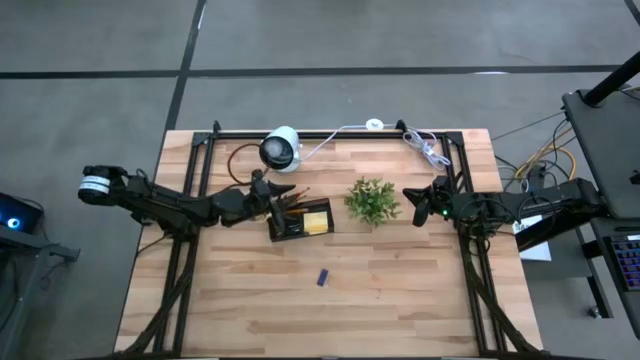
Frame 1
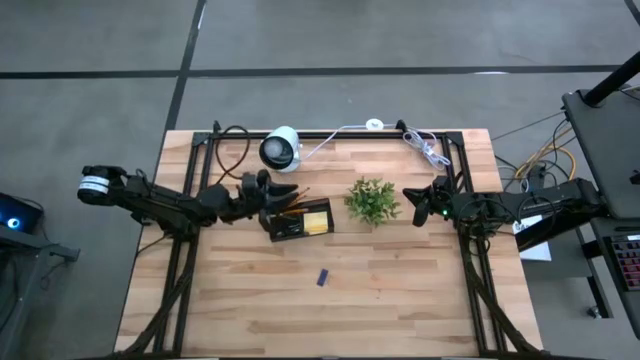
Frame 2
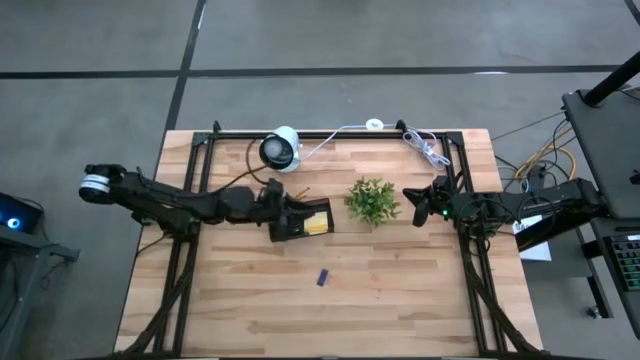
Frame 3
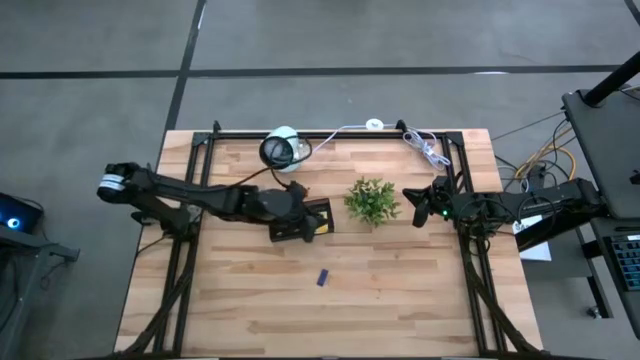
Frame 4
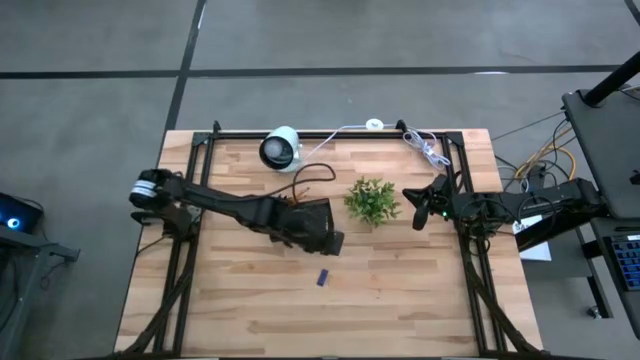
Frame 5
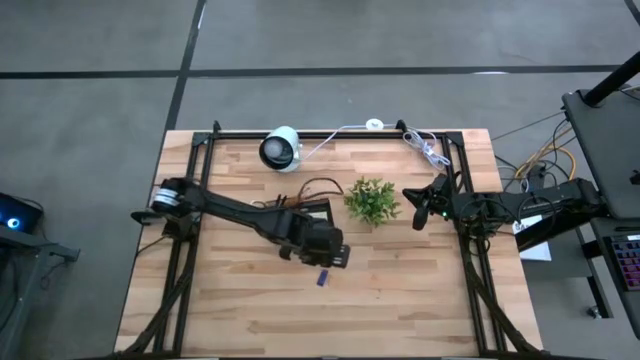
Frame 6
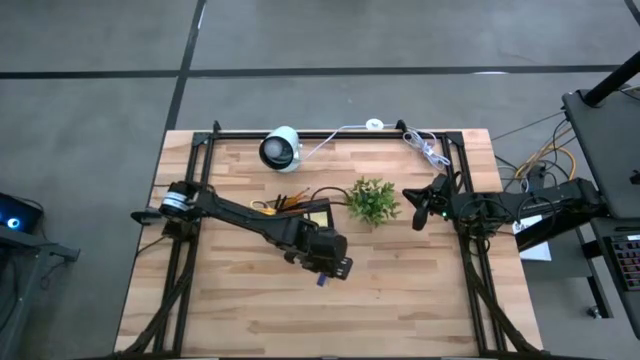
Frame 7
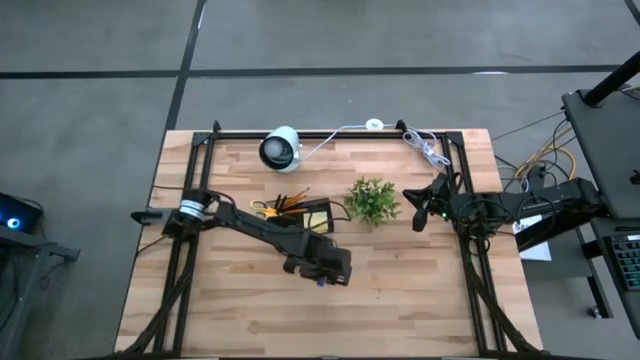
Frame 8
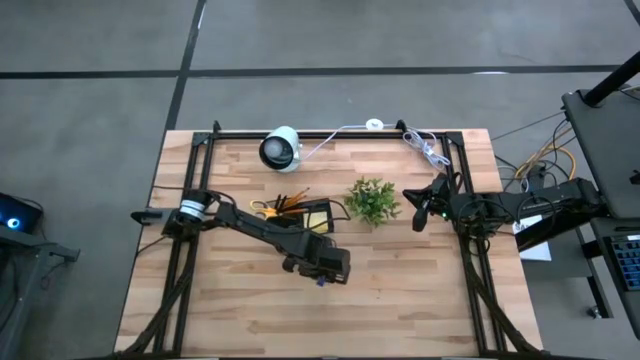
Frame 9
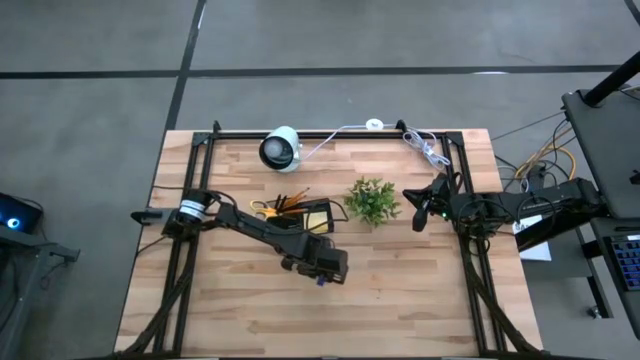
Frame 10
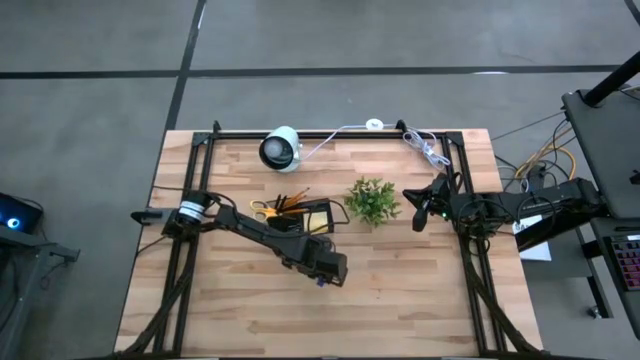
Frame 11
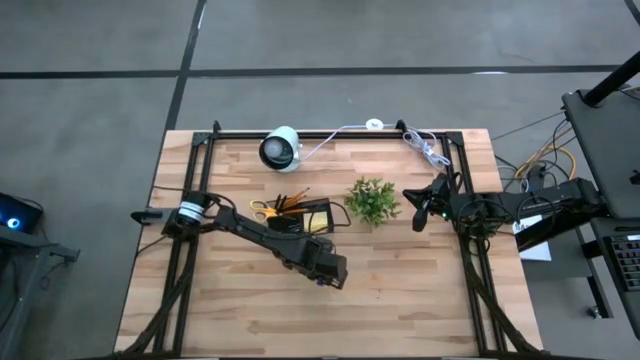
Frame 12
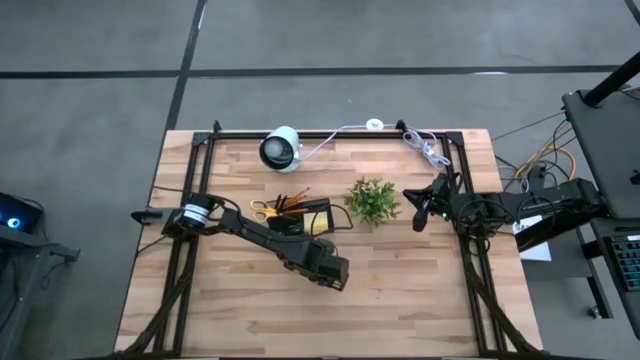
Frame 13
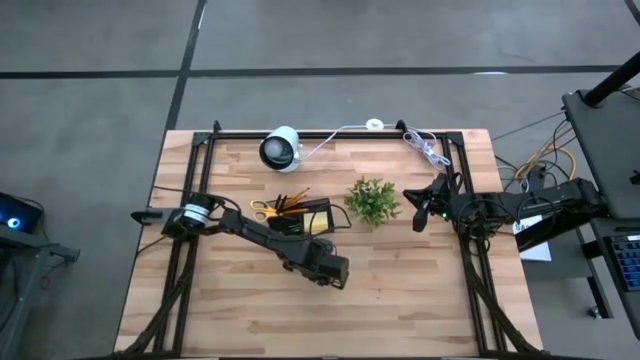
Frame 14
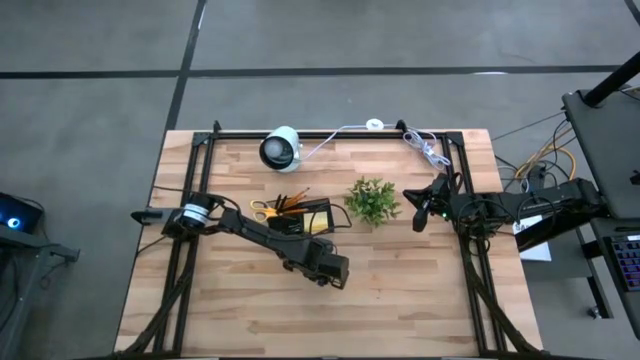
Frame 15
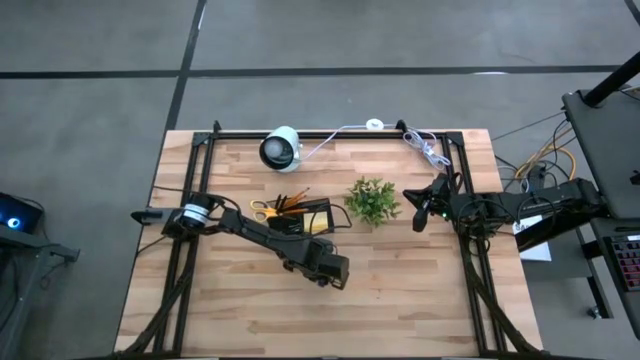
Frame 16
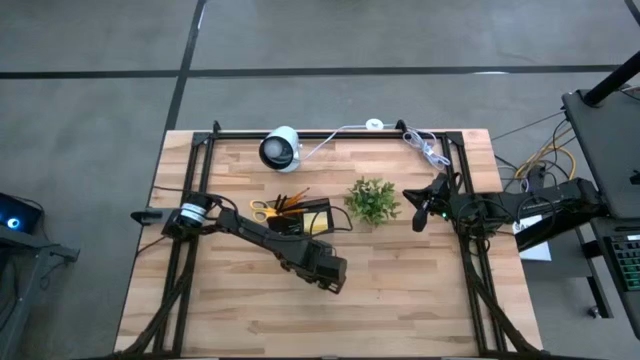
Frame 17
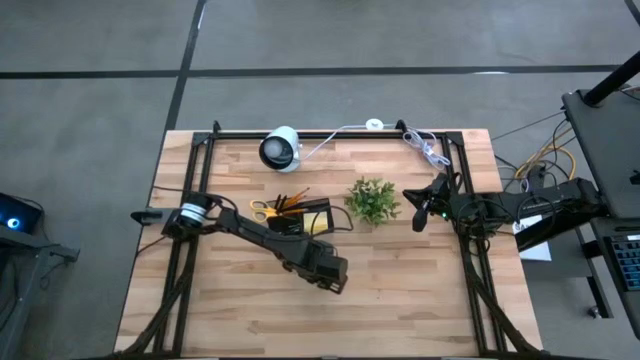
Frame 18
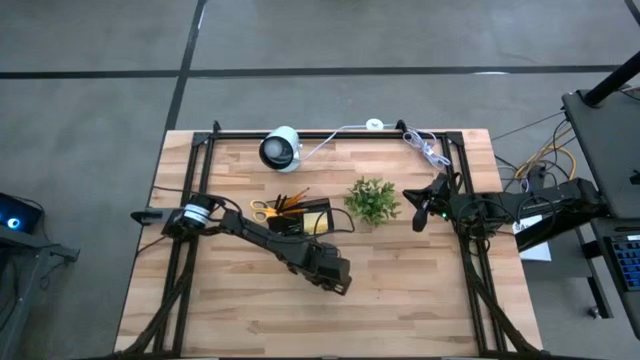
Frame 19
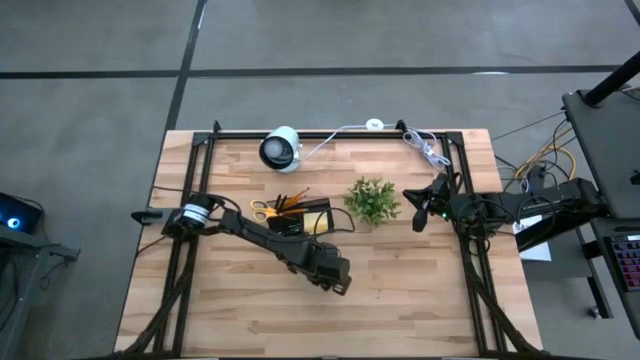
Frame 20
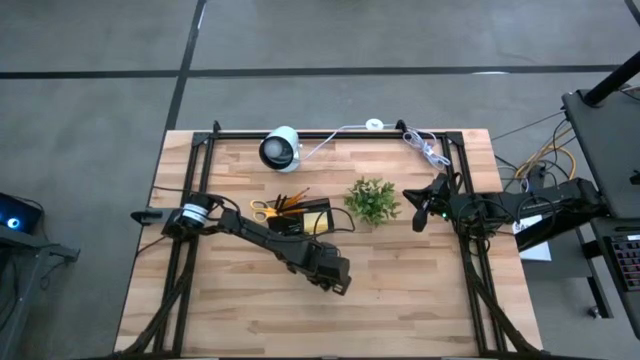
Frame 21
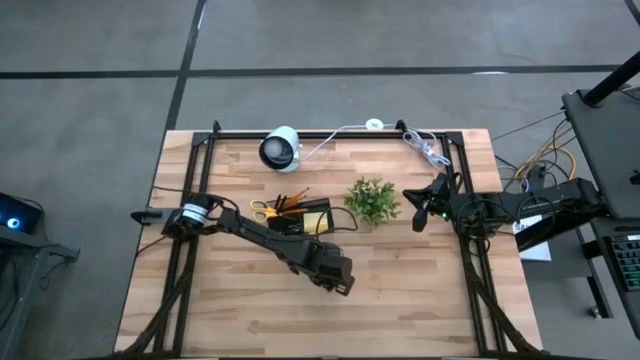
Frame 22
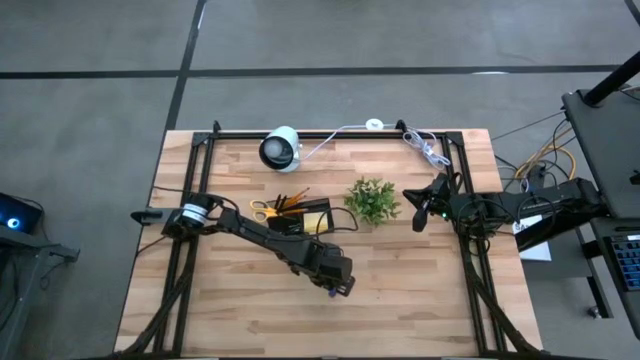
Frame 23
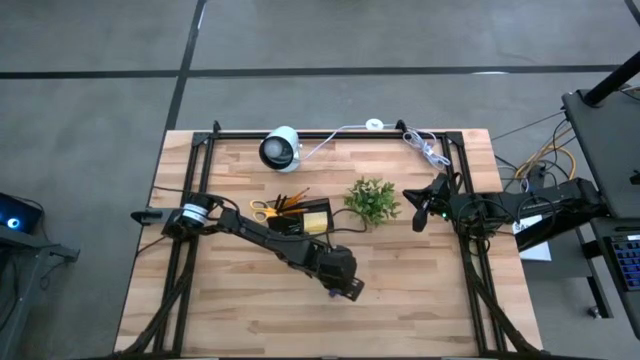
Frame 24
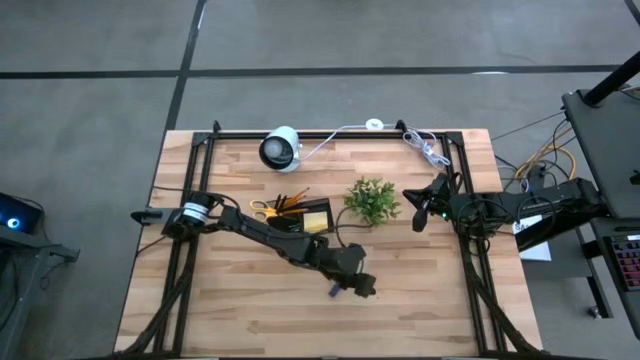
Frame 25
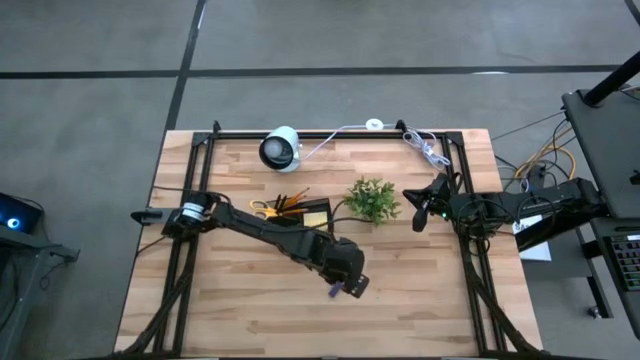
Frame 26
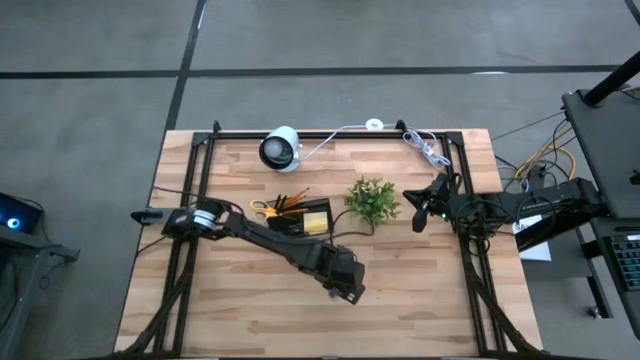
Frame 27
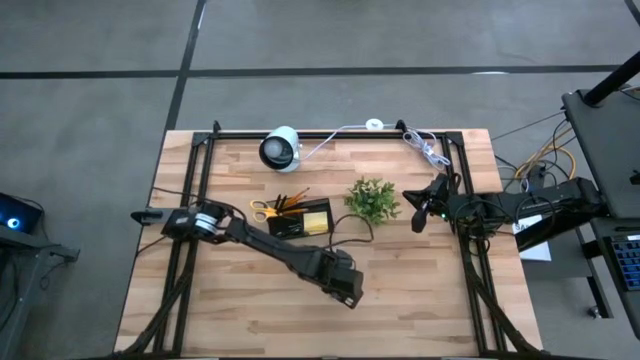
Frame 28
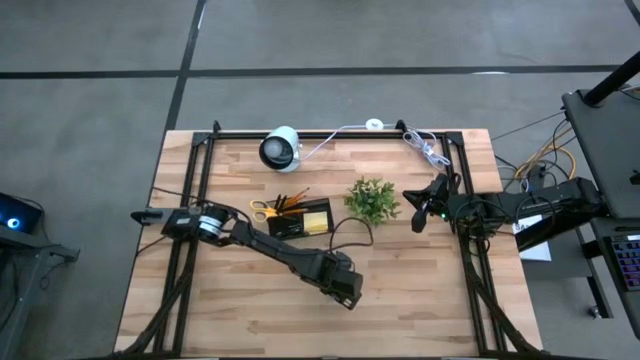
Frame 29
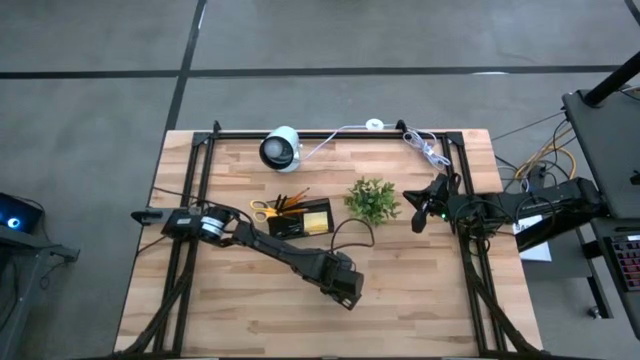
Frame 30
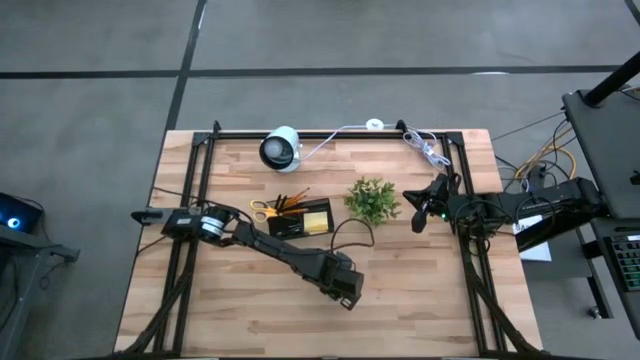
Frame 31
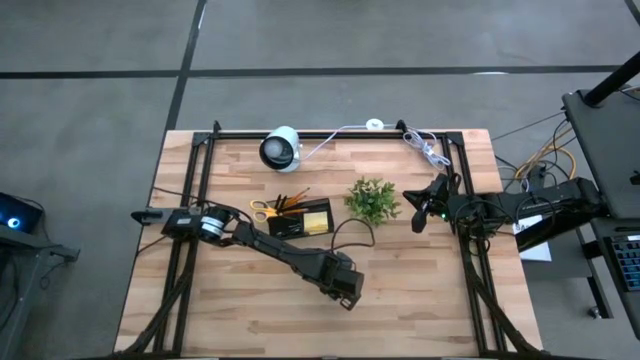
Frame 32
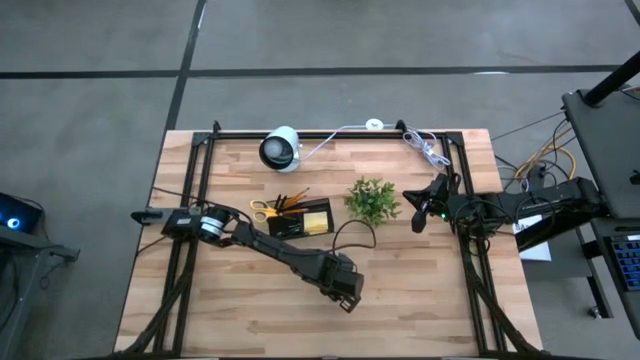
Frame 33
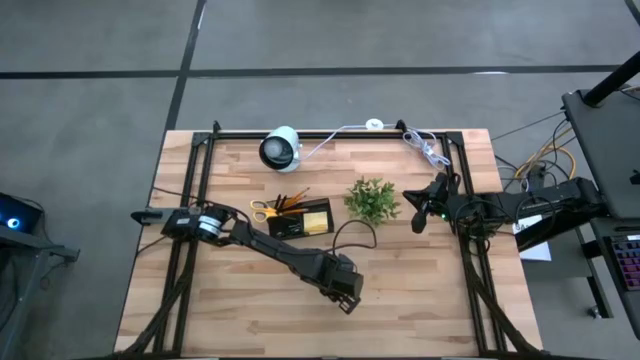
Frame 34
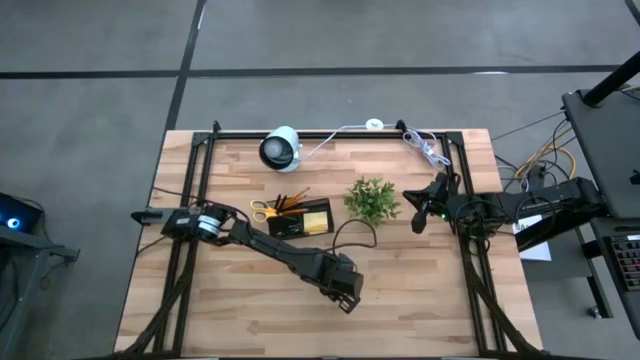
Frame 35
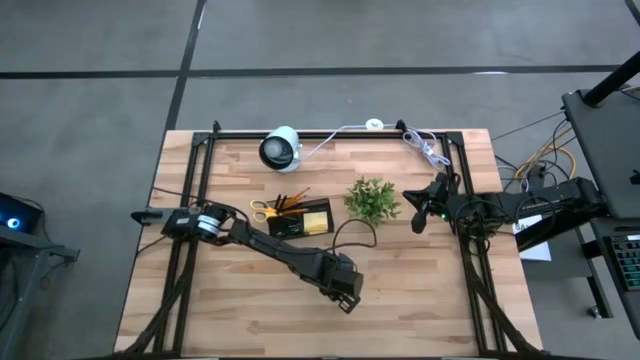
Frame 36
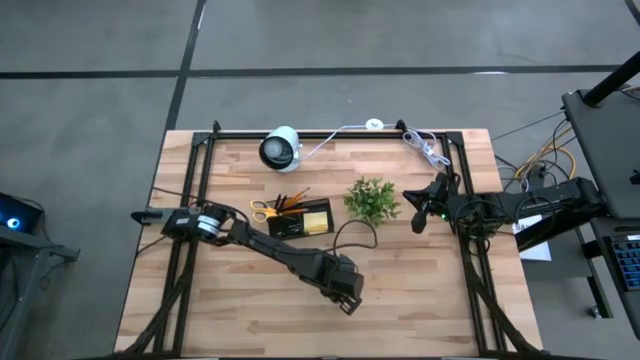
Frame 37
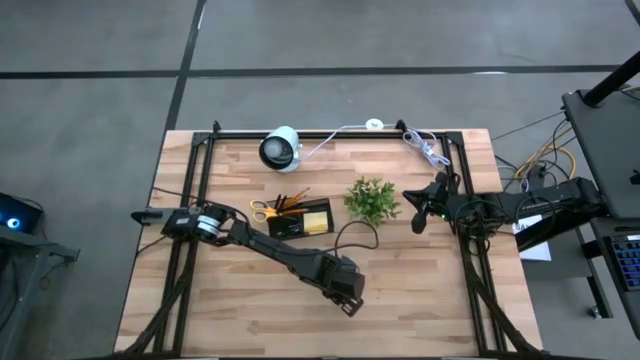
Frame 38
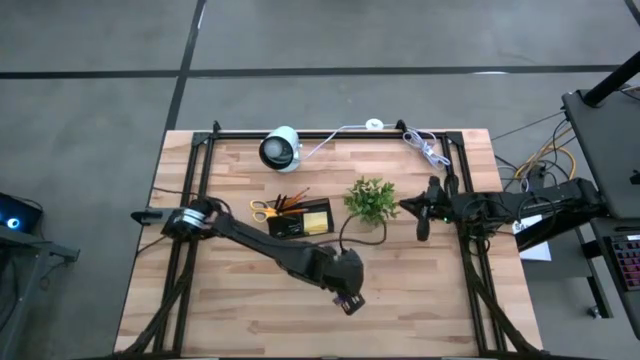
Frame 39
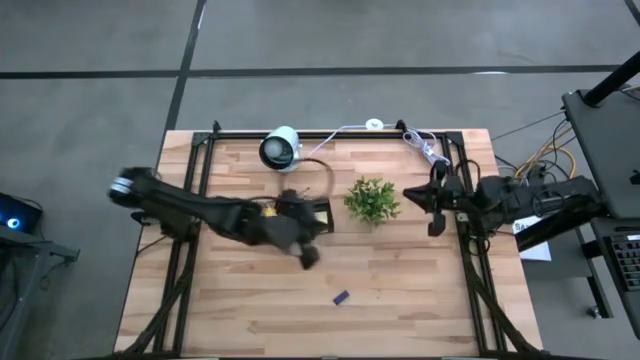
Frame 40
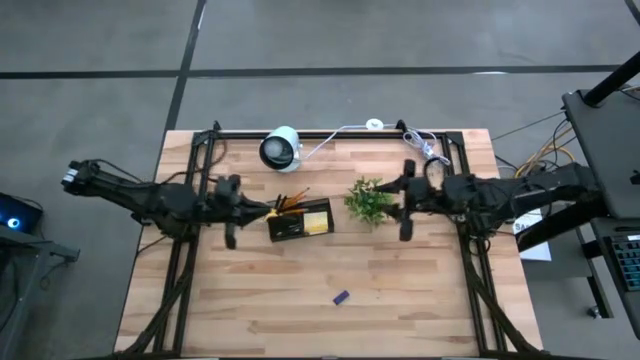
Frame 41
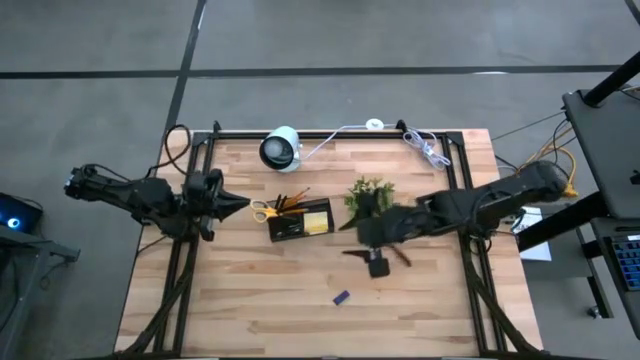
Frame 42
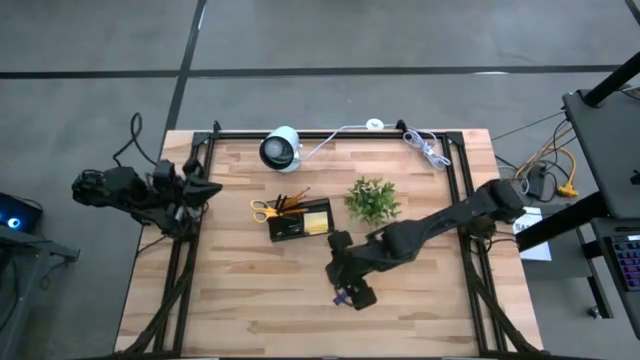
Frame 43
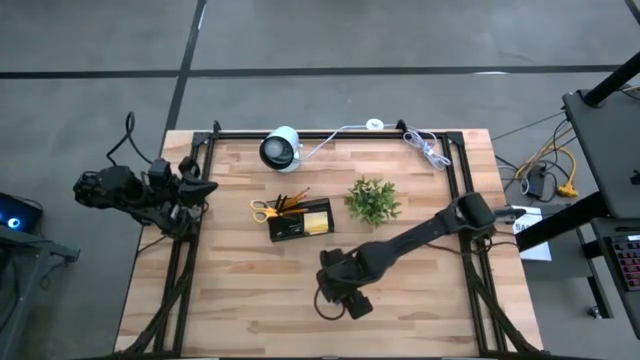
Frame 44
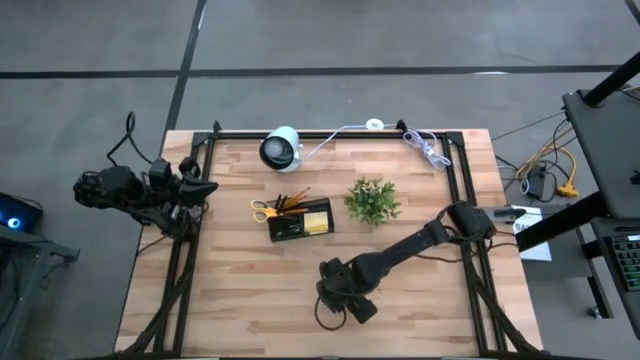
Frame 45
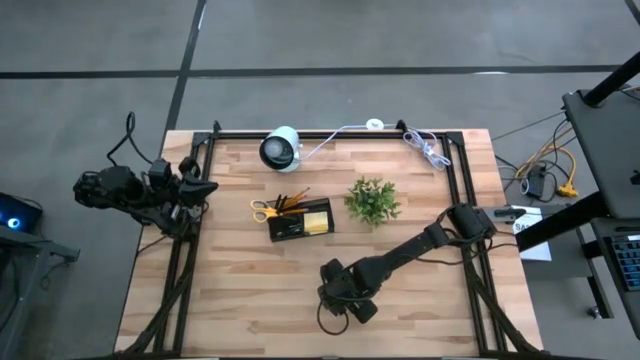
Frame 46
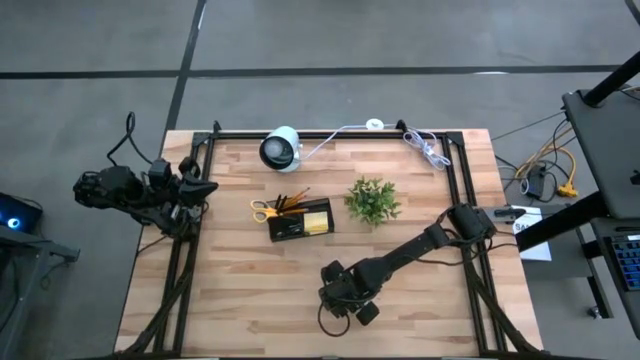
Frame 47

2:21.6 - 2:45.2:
Task: Pick and place office supplies into organizer
Put the blue eraser in the black desk organizer
